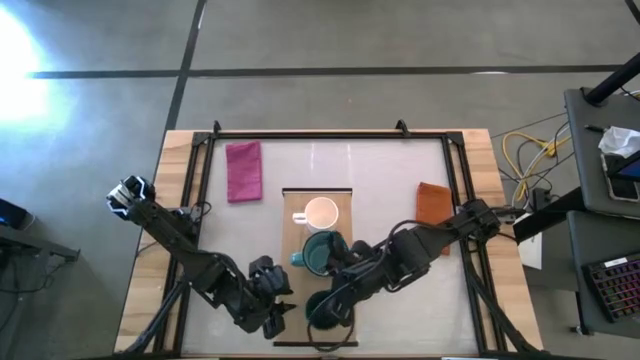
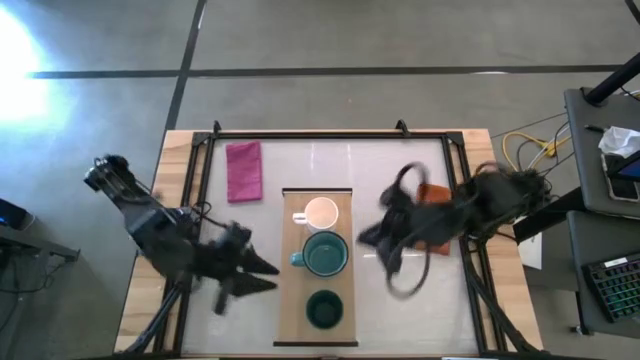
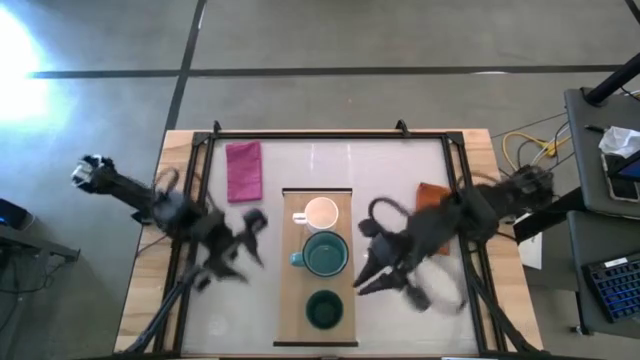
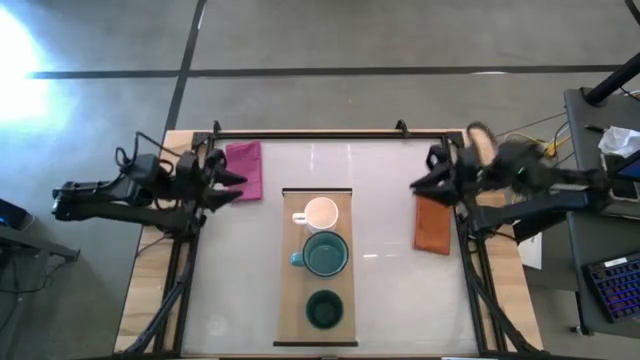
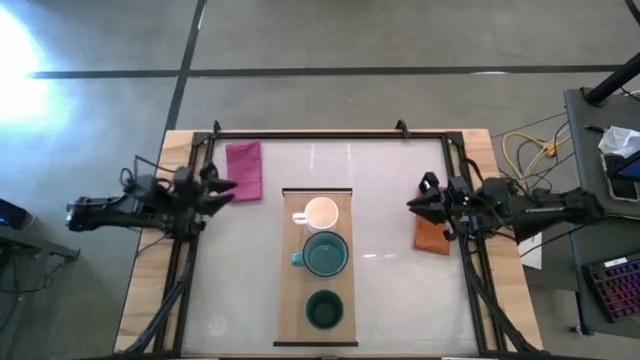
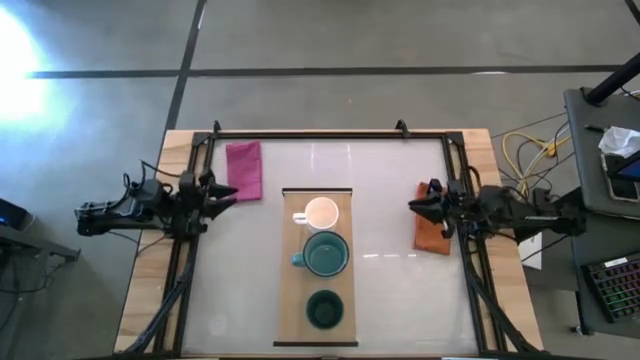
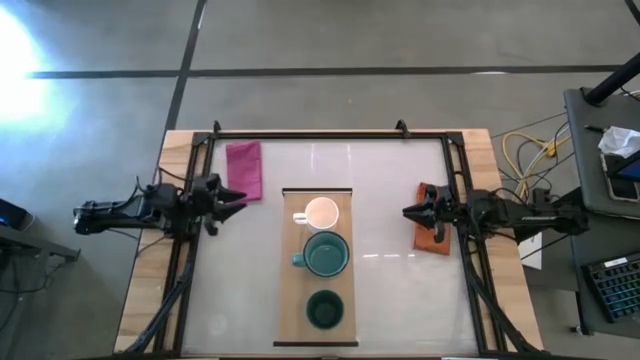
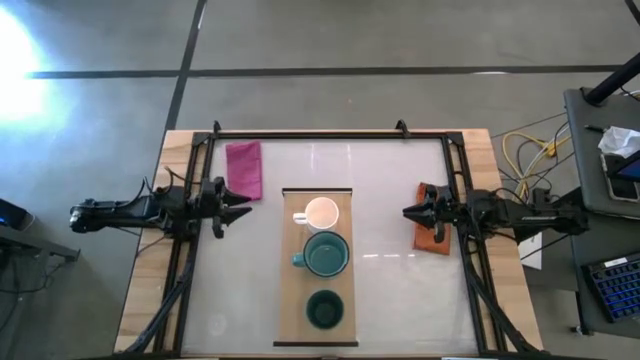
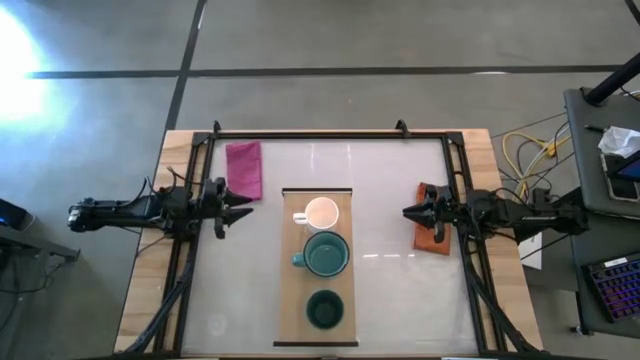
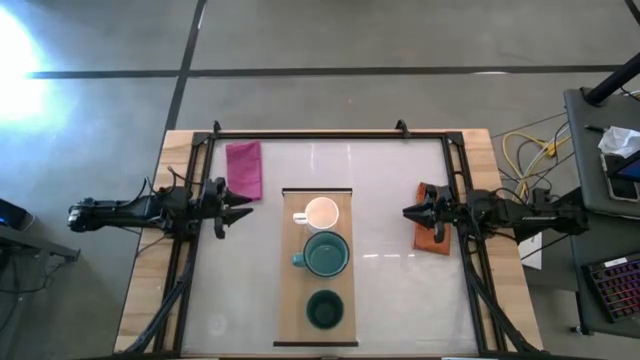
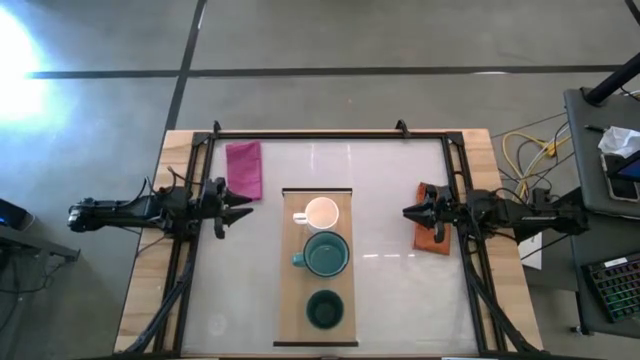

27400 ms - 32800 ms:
Task: Stack small to large cups/mugs on shelf
Return to Home Position

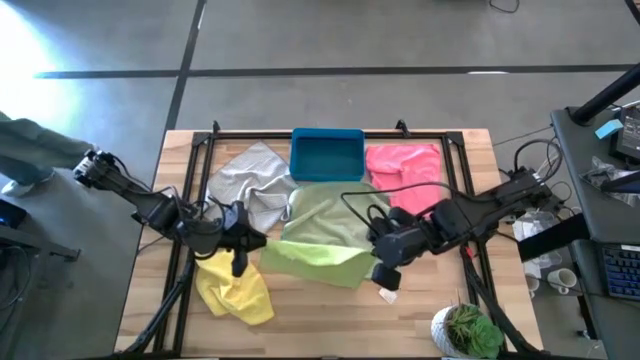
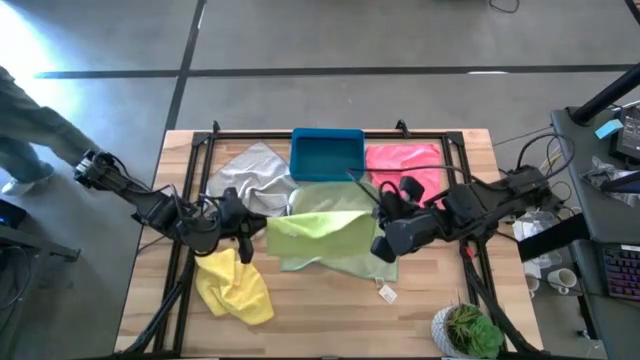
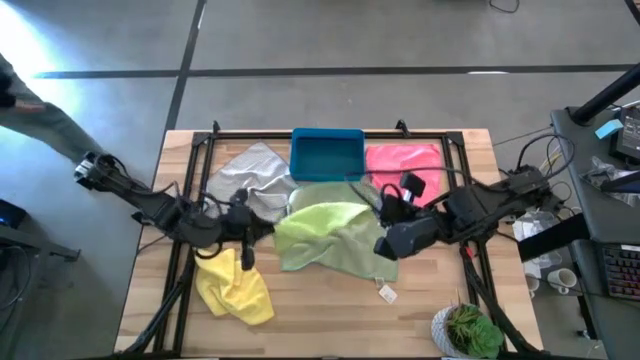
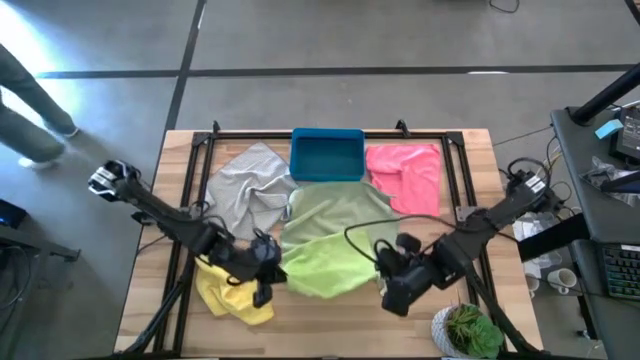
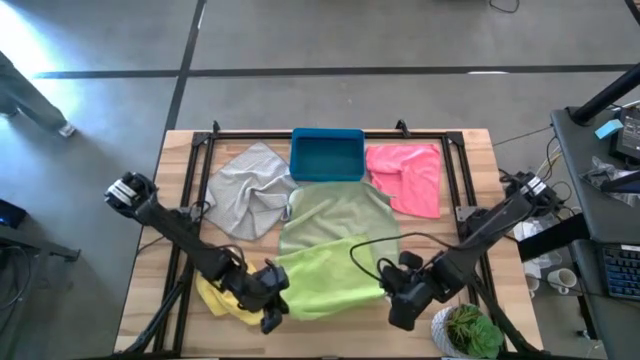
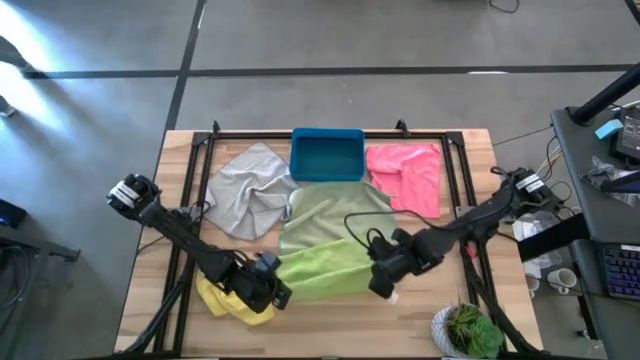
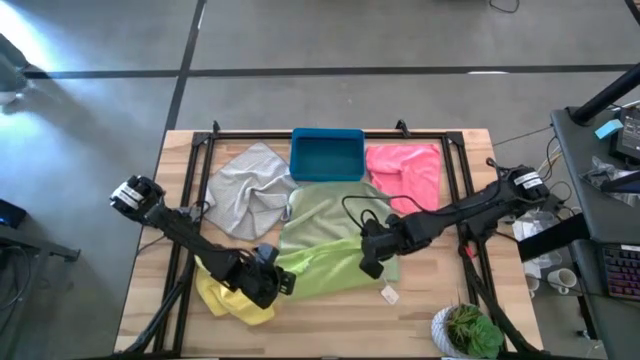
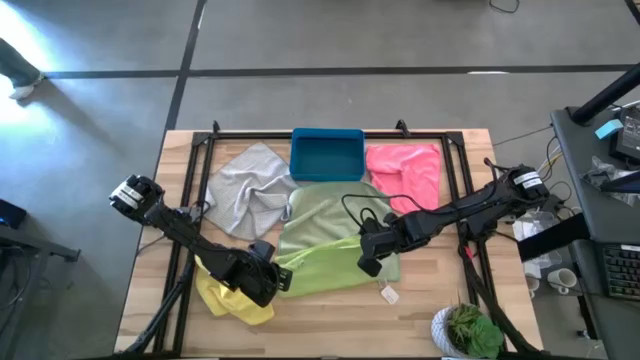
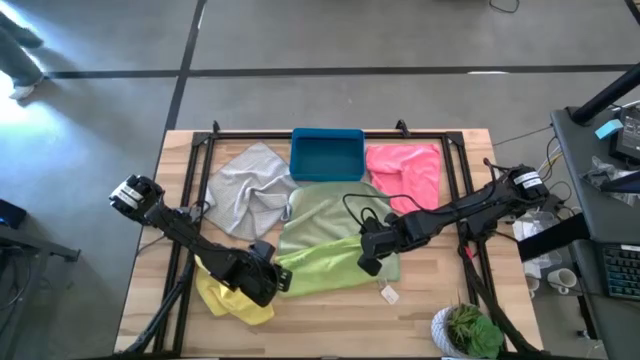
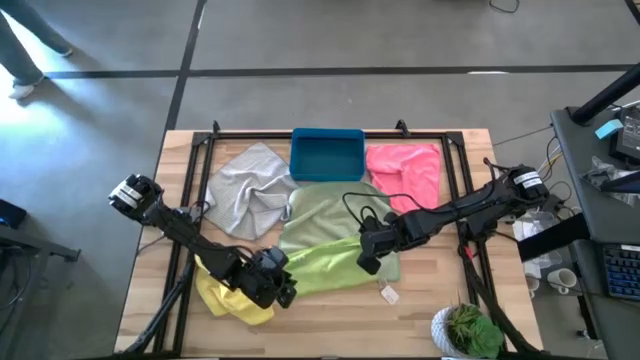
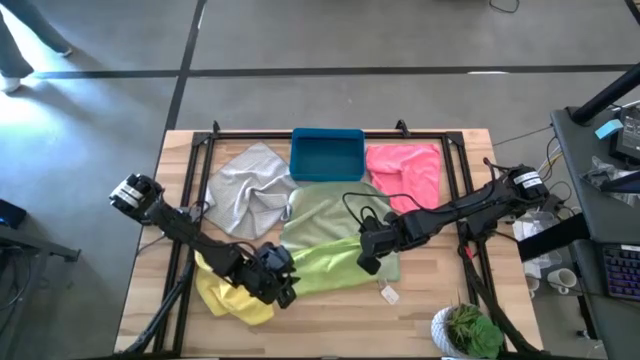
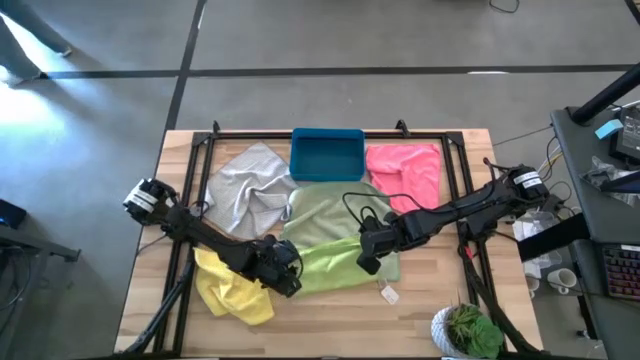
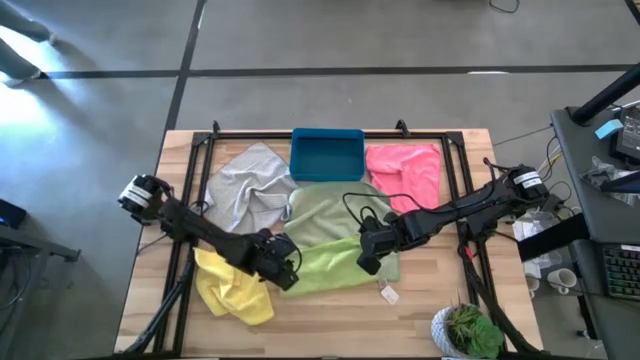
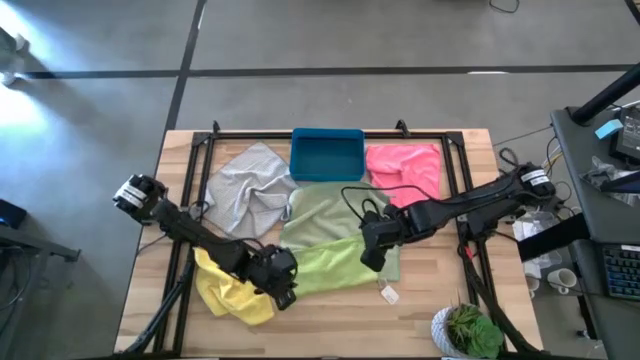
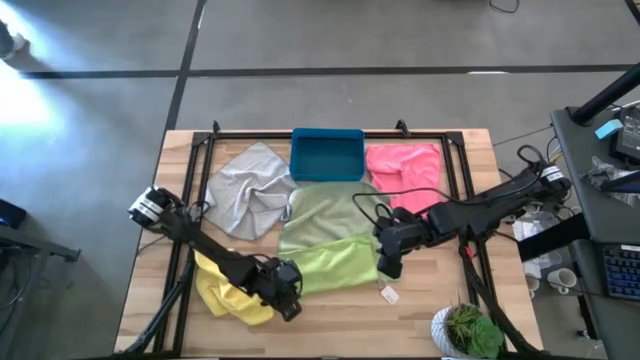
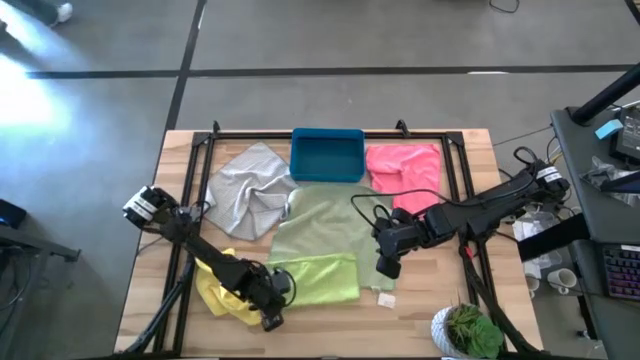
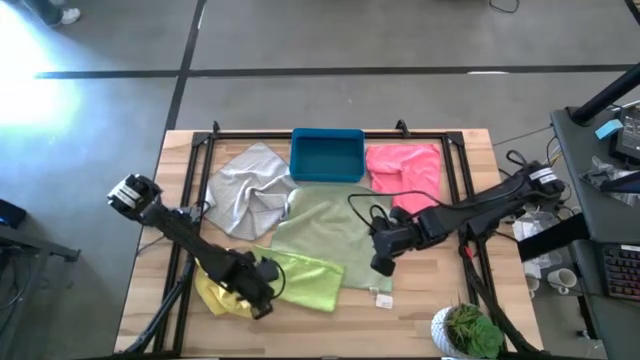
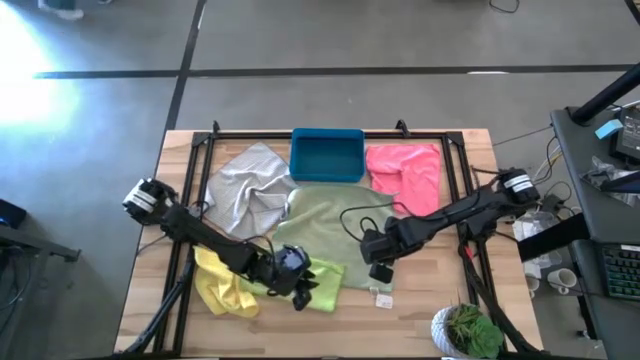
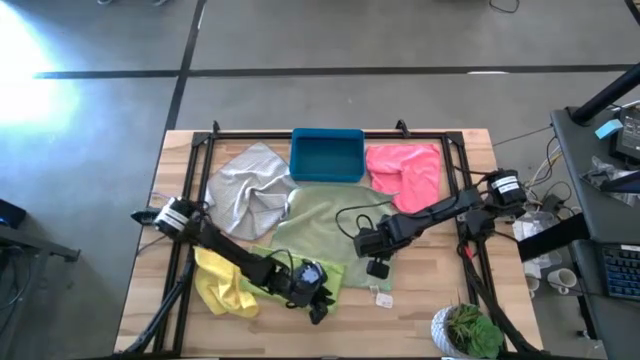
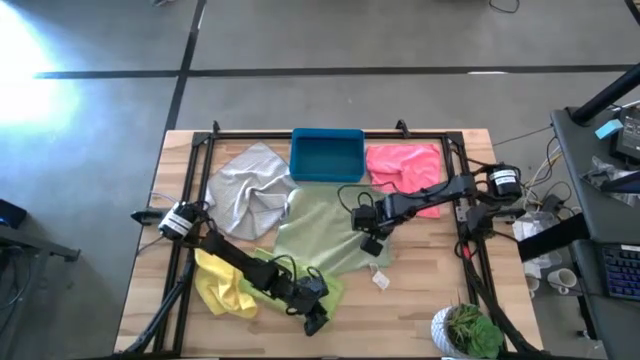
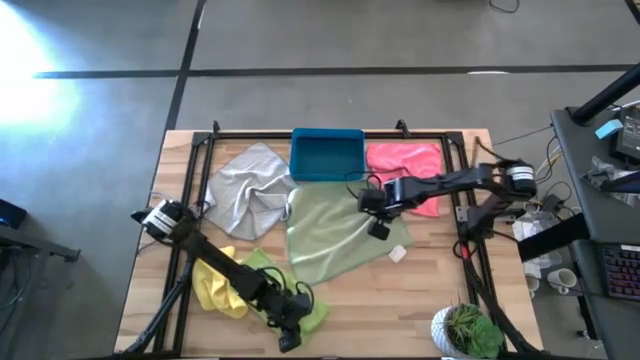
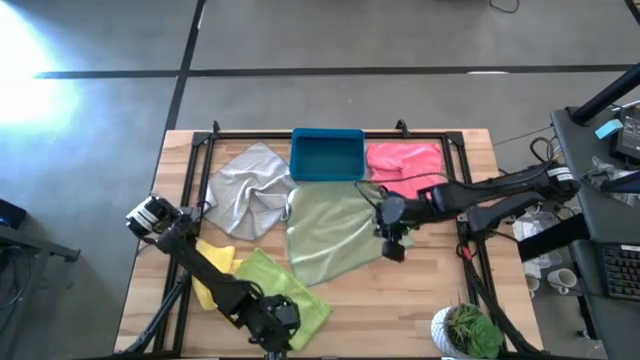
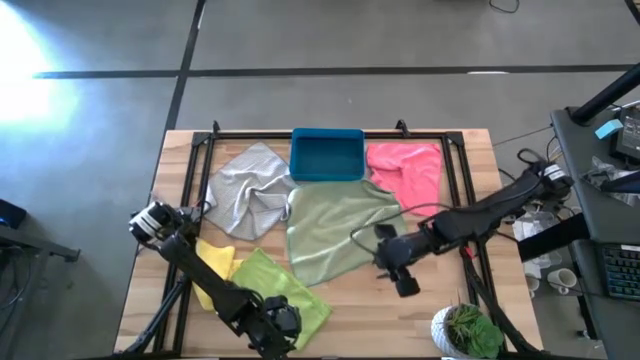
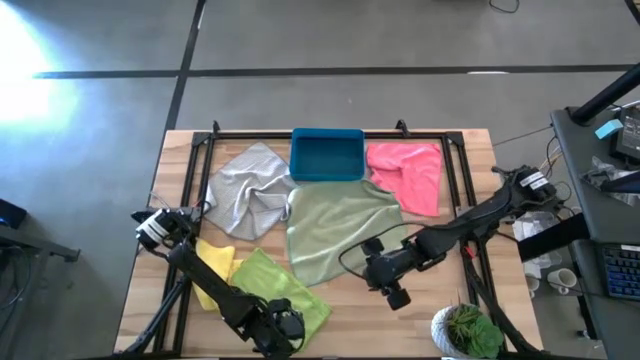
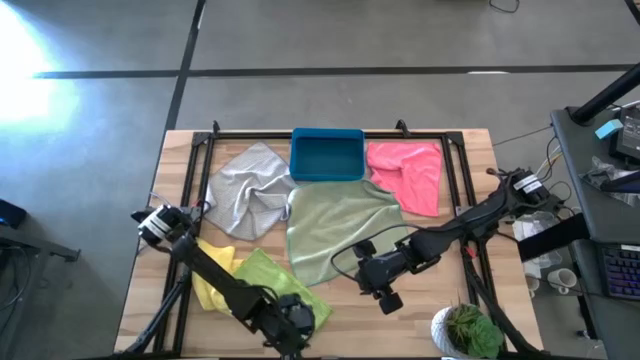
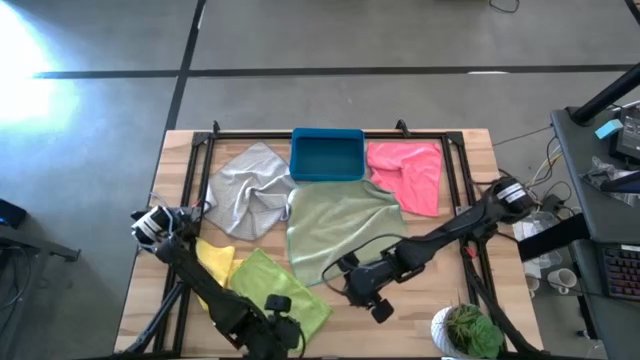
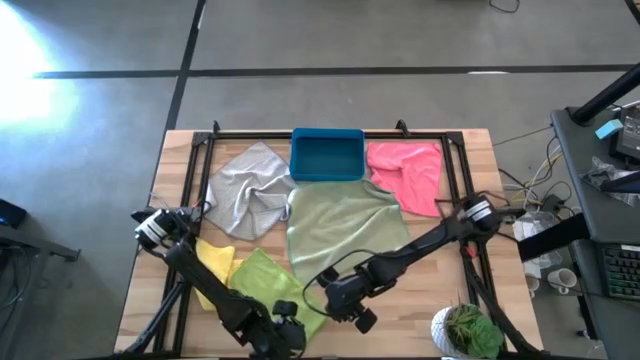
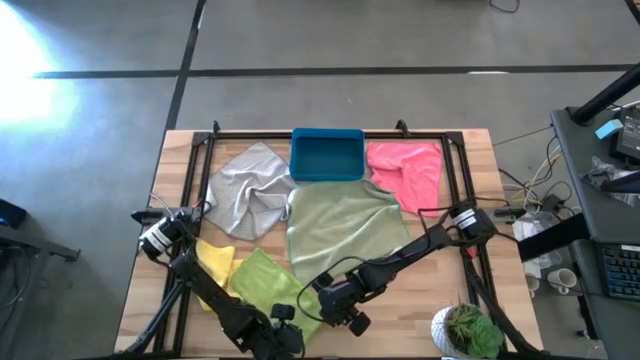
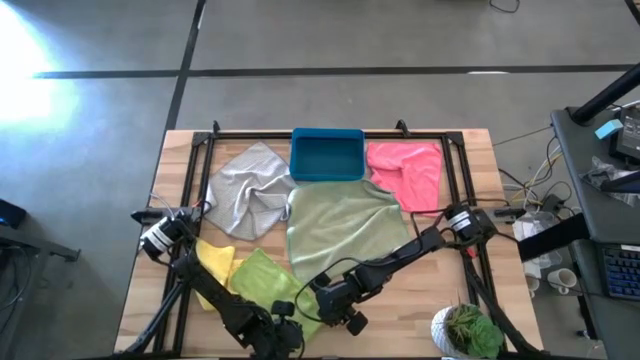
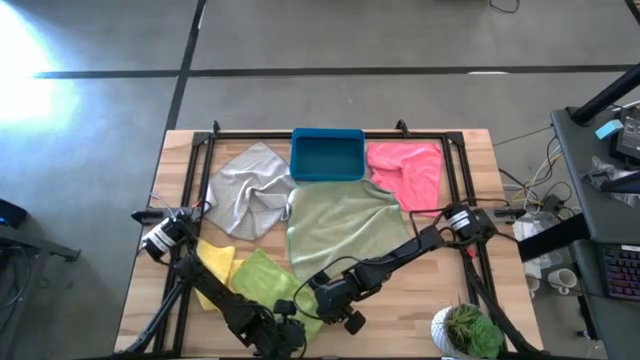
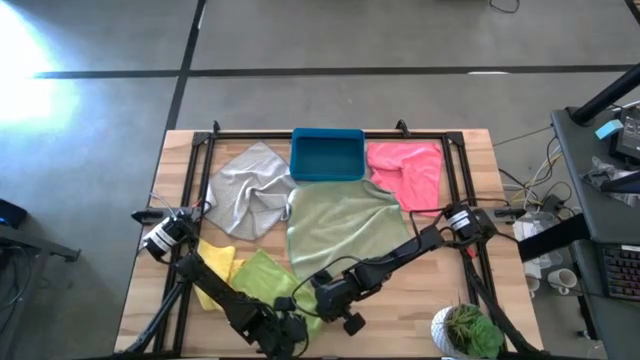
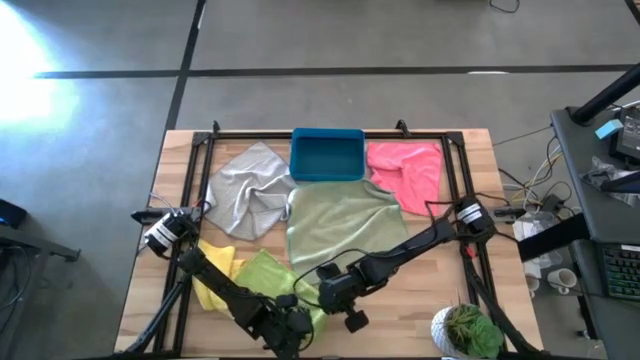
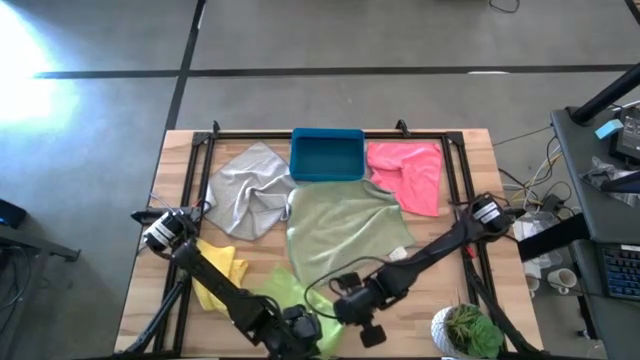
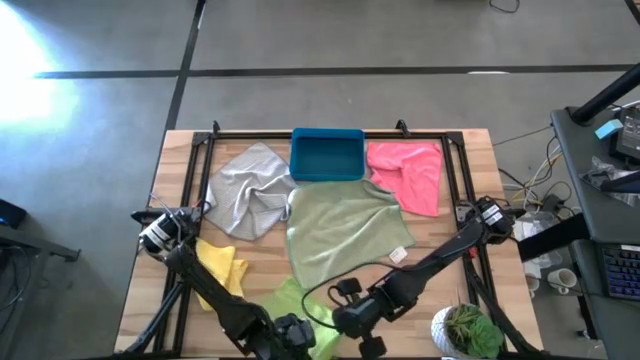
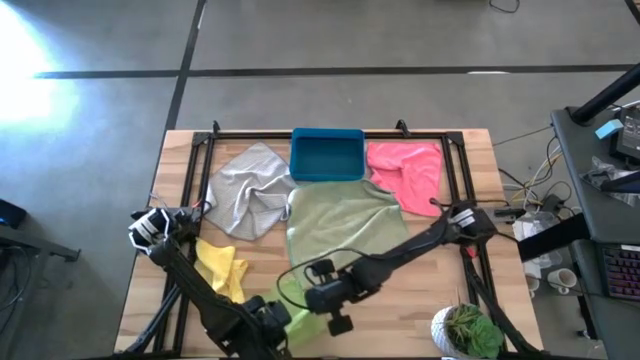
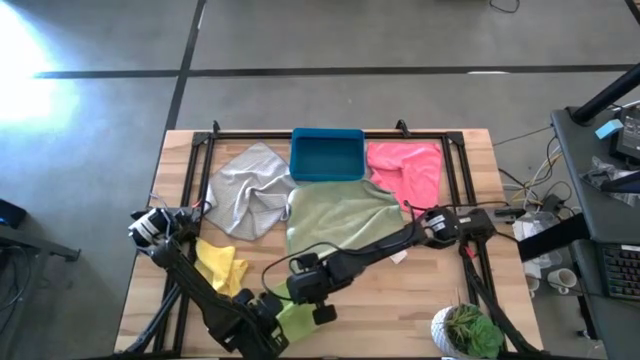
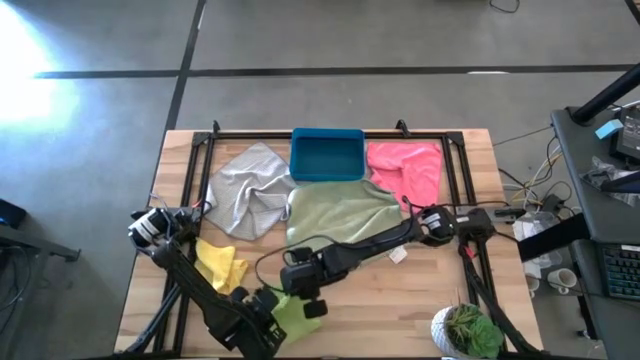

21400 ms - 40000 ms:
Task: Fold microfiber towels
Fold the light green microfiber cloth
